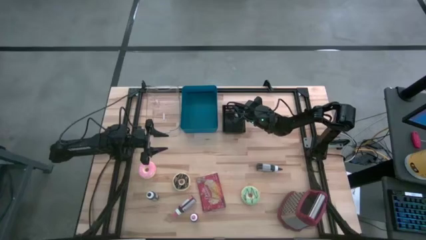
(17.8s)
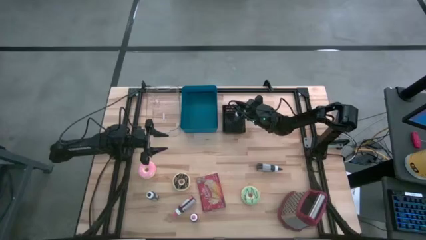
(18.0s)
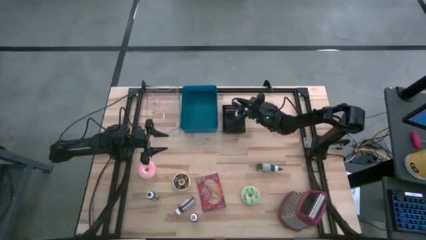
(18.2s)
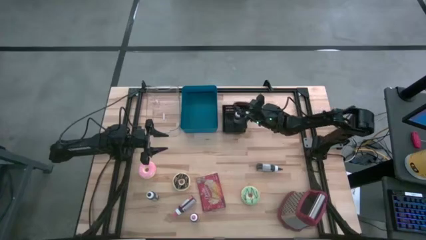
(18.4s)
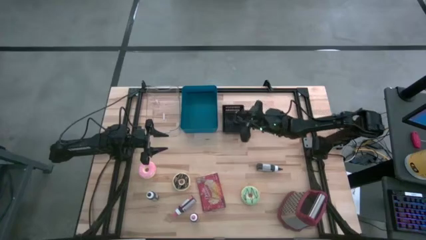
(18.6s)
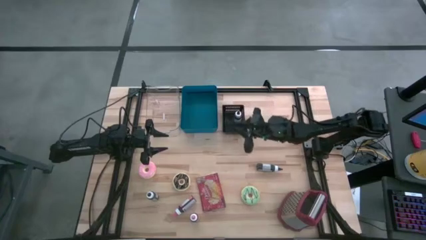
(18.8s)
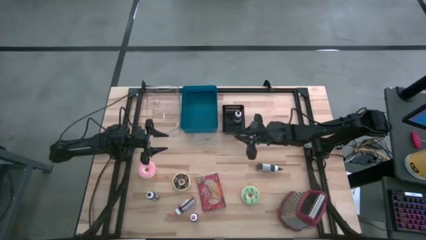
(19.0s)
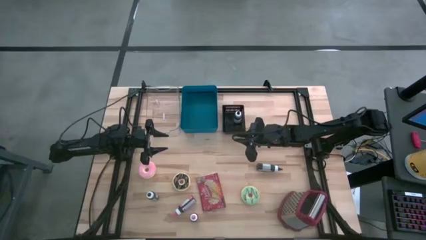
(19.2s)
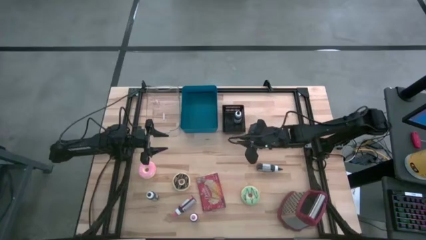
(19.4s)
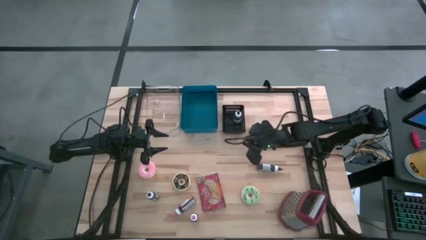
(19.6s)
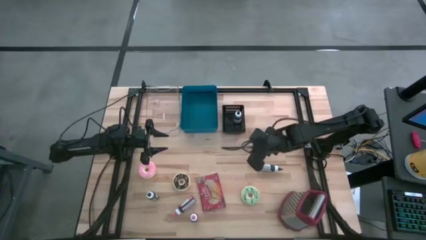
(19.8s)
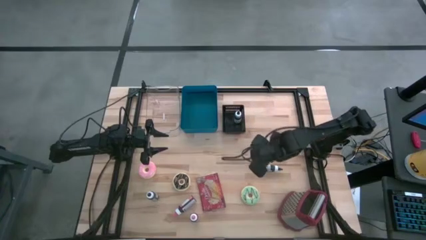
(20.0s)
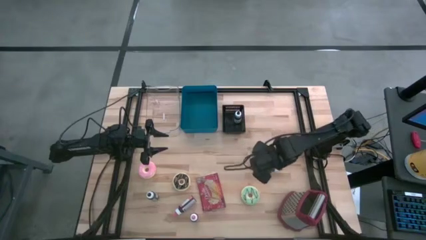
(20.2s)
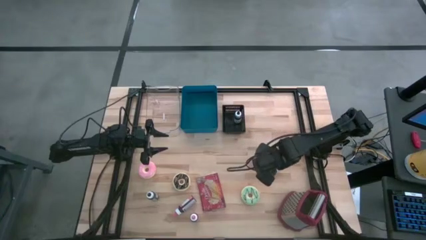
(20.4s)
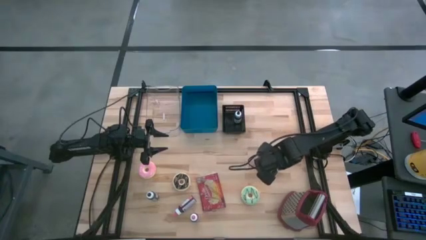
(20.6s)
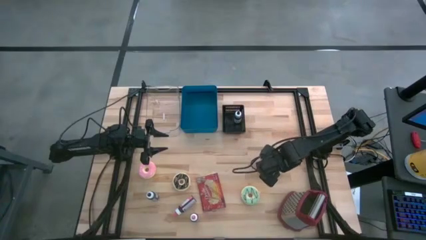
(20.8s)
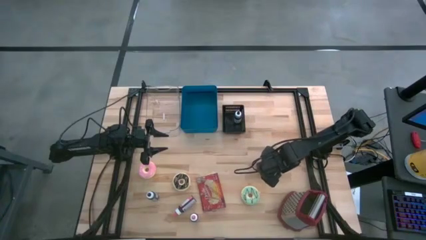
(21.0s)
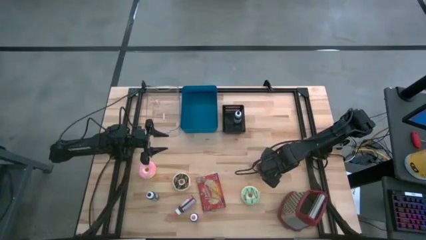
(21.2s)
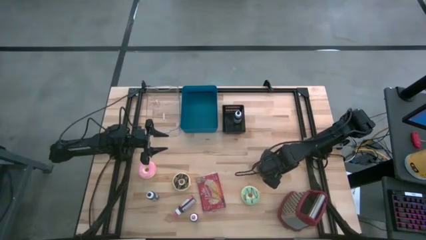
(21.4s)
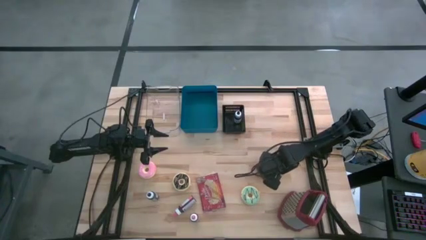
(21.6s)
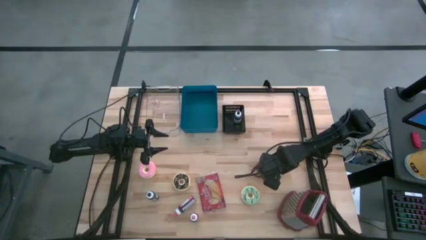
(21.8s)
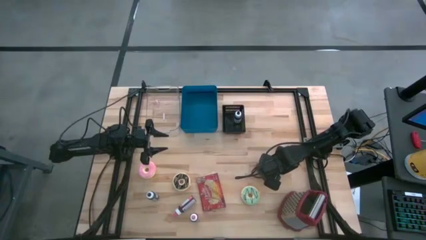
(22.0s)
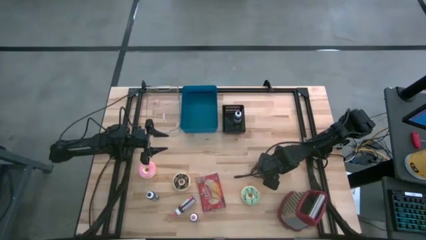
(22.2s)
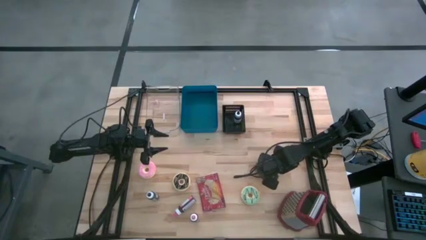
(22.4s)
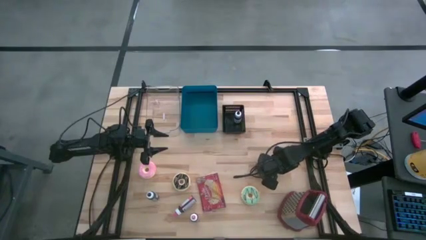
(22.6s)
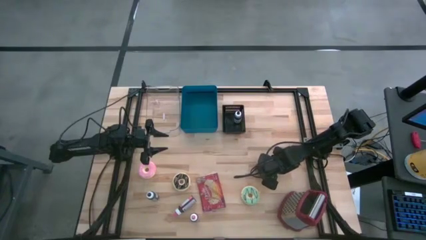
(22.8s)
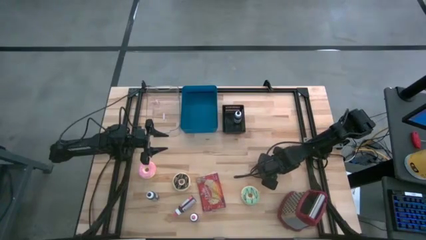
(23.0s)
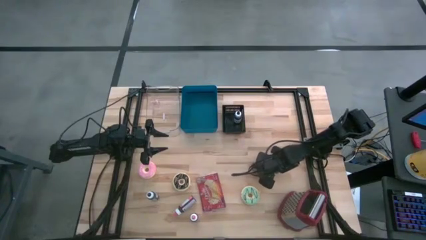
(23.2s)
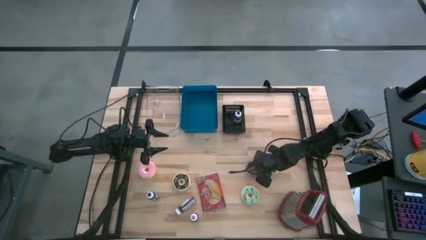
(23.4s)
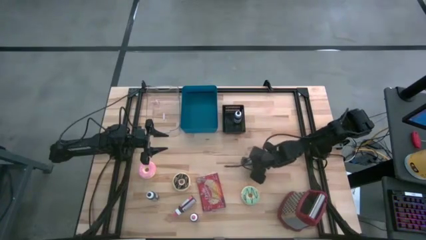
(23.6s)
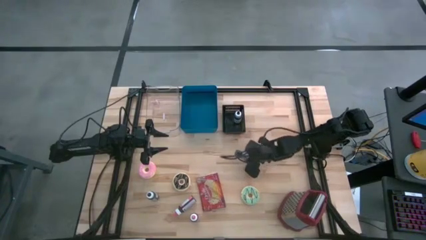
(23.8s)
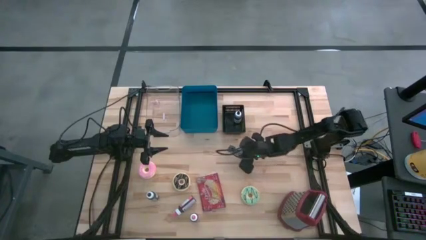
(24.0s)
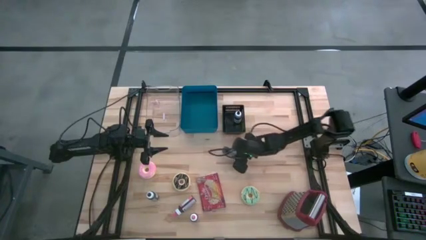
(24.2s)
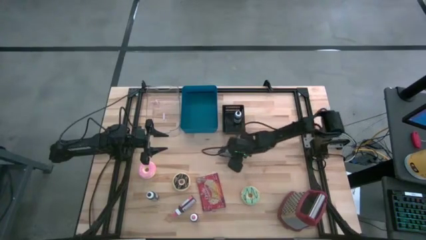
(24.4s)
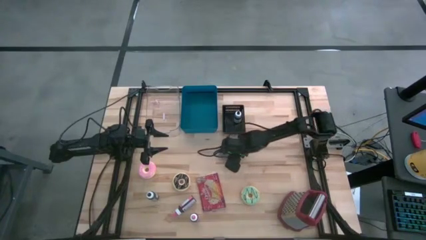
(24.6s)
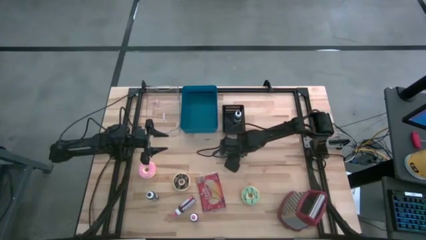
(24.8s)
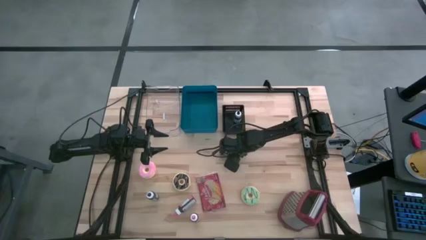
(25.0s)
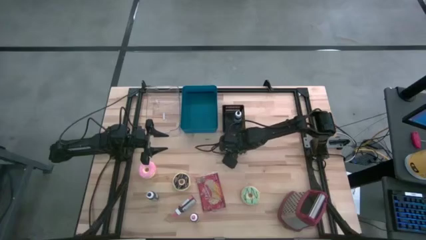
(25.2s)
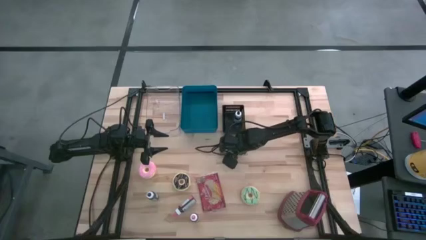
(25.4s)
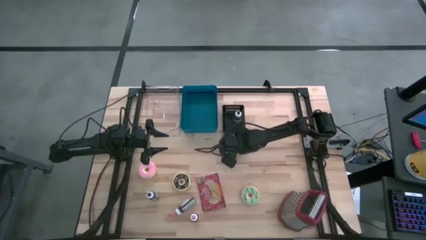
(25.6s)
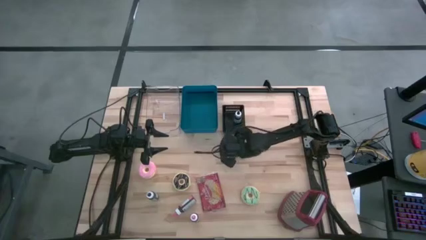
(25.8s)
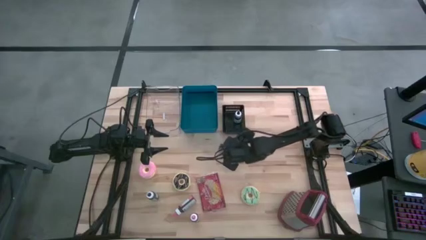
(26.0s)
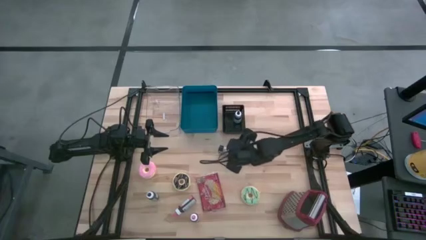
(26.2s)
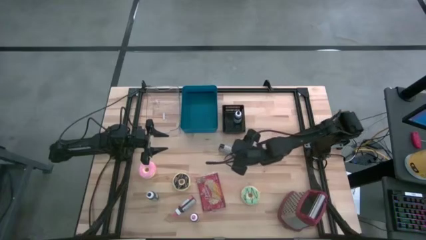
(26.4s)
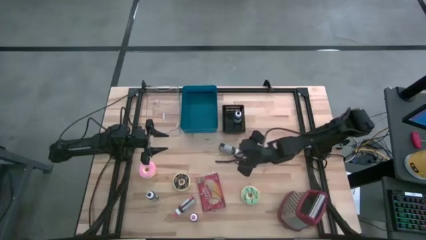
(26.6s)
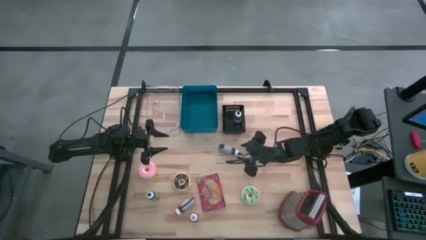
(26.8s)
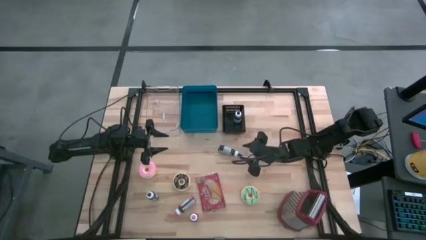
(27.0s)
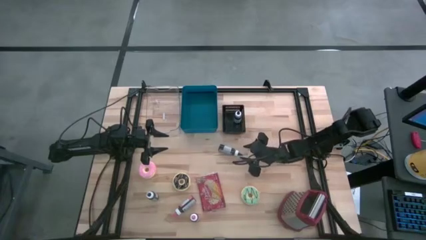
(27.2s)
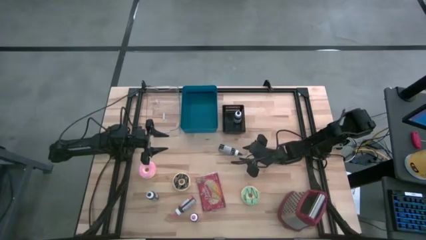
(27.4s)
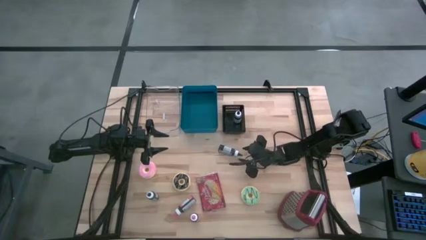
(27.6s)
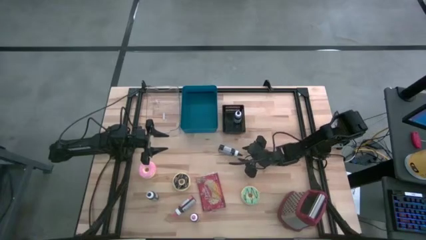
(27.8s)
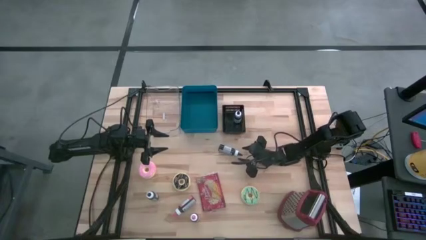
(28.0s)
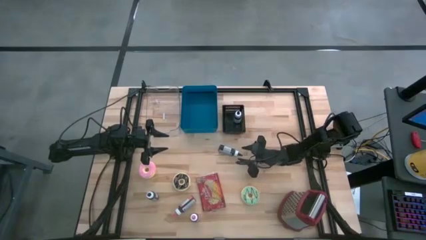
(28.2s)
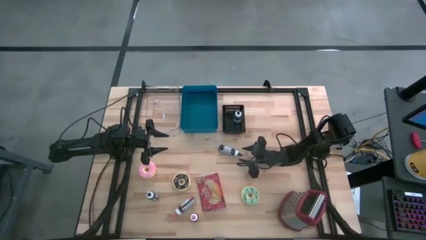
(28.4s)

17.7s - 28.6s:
Put the top black food coloring into the black bin
